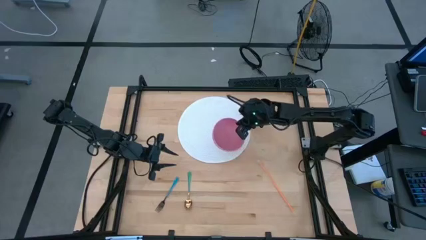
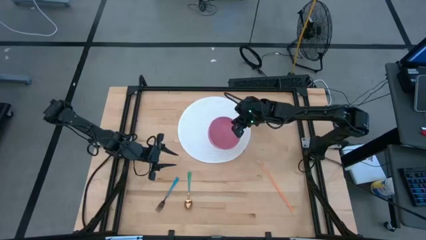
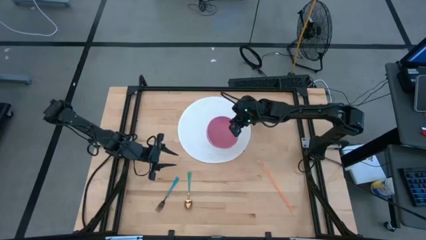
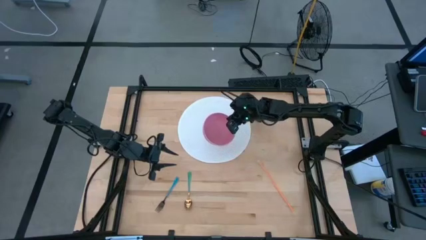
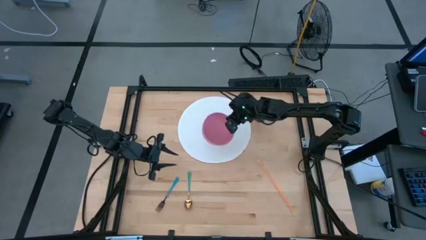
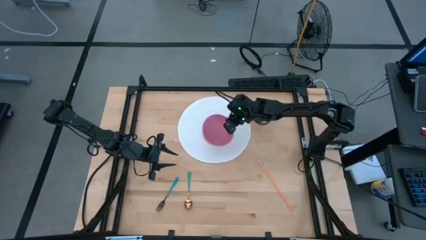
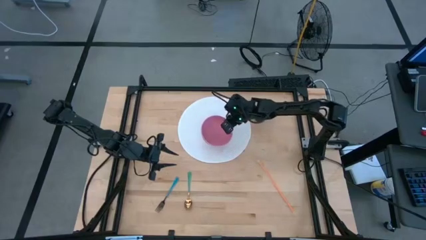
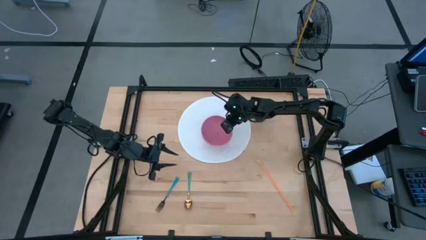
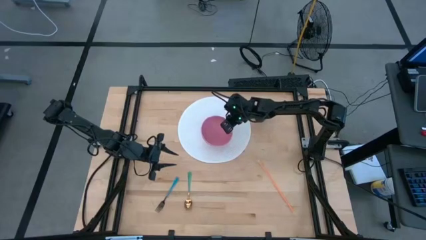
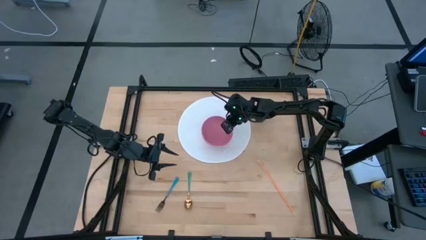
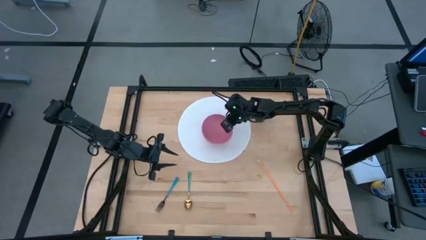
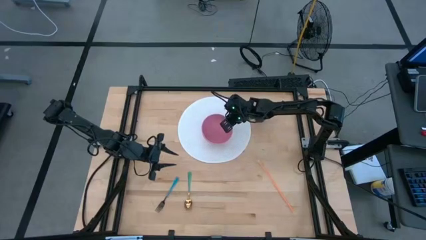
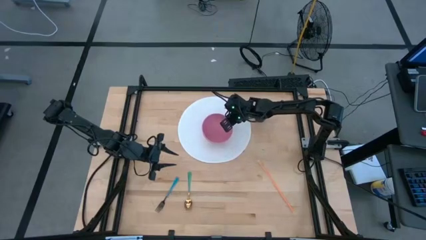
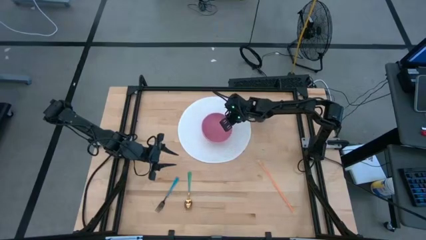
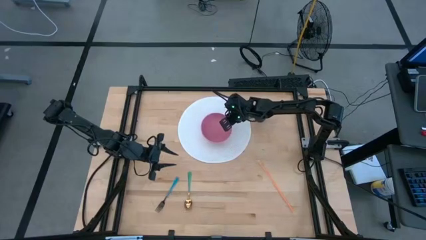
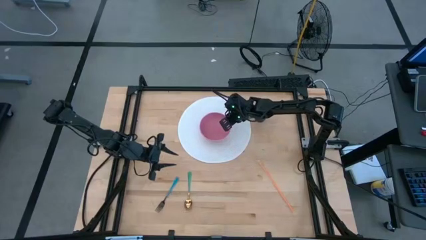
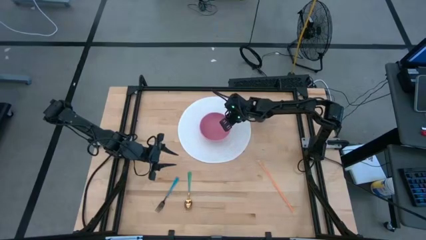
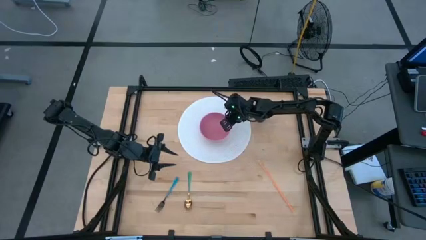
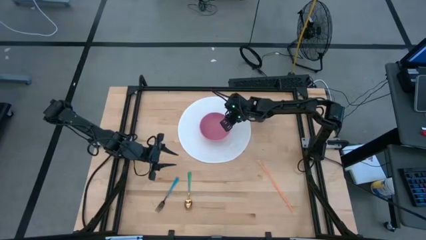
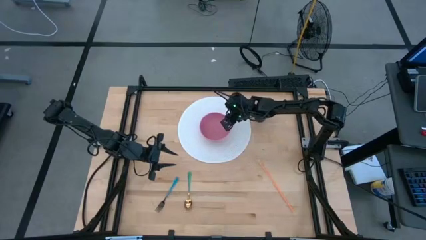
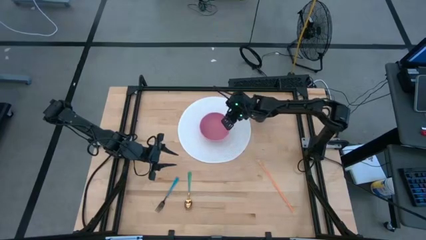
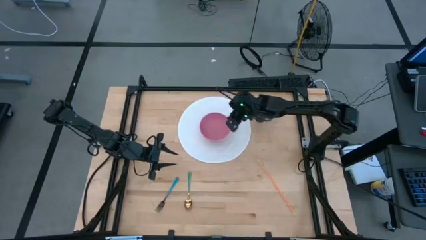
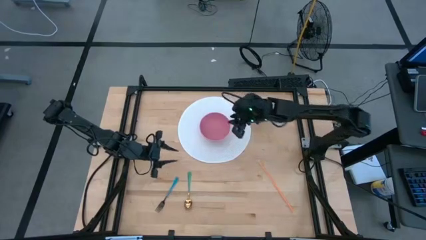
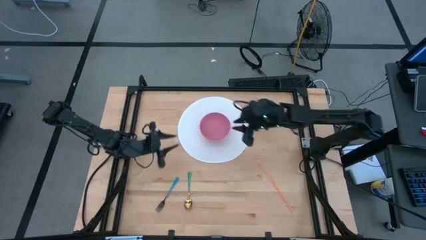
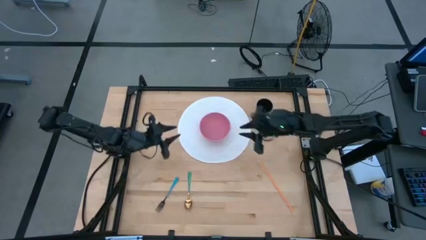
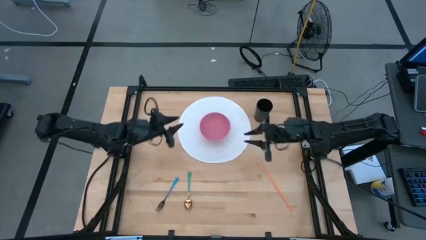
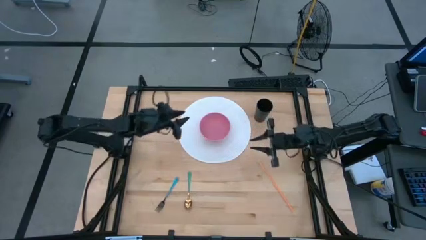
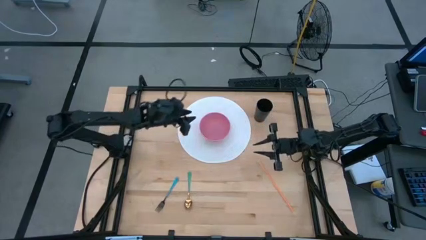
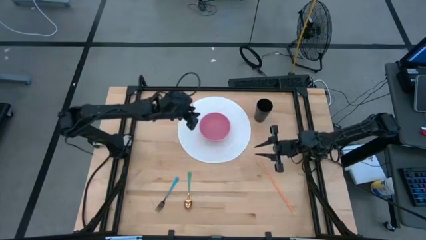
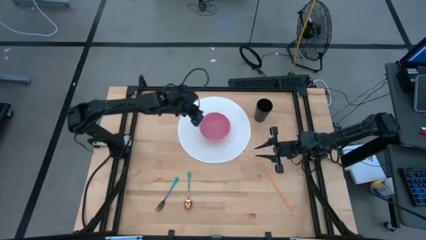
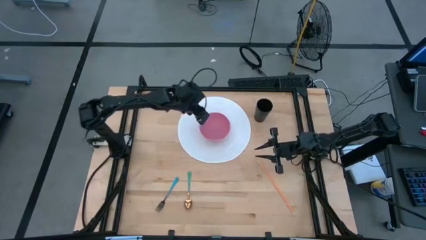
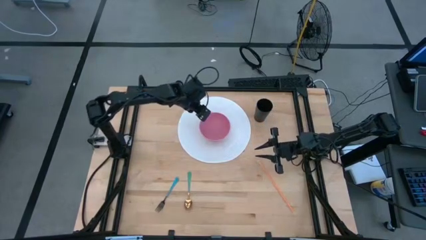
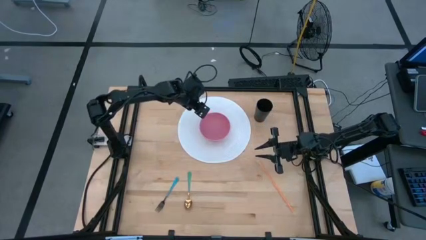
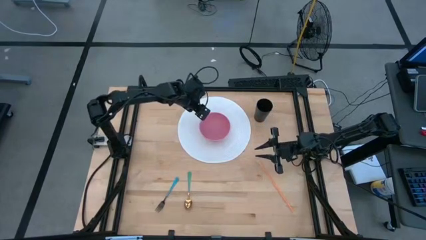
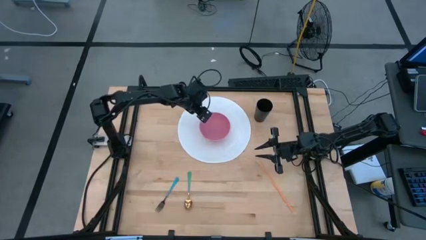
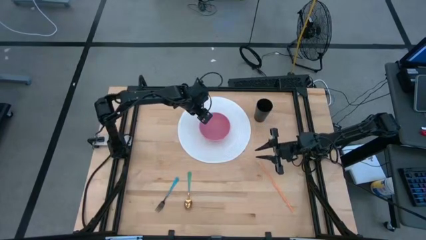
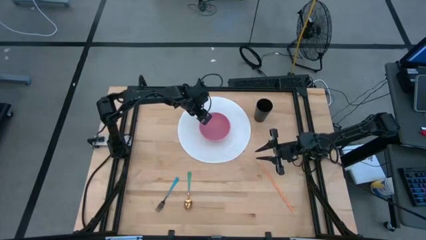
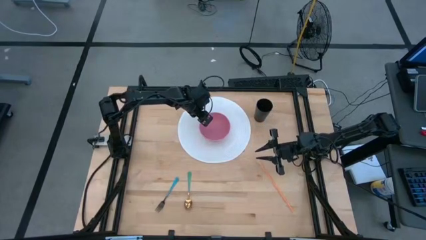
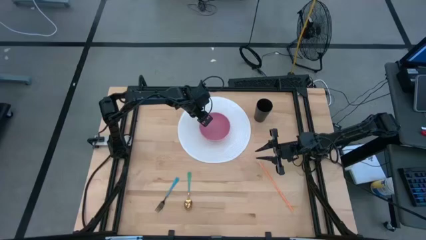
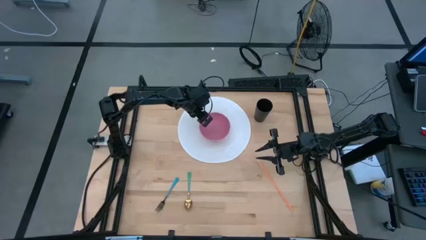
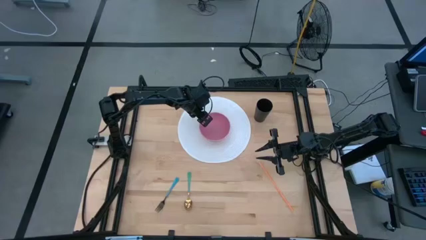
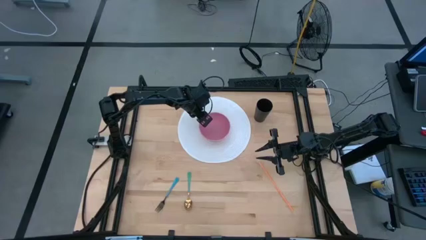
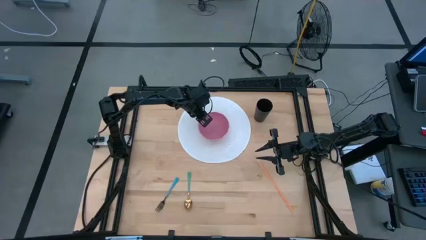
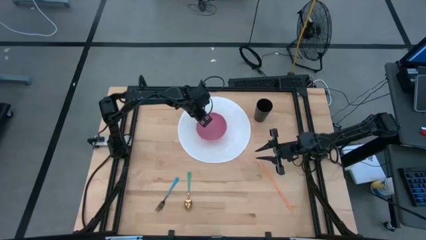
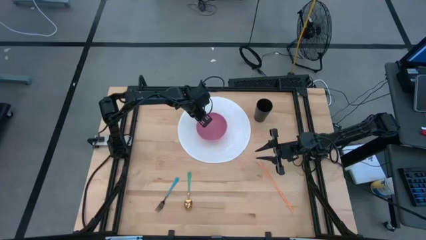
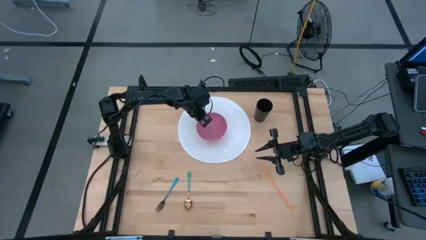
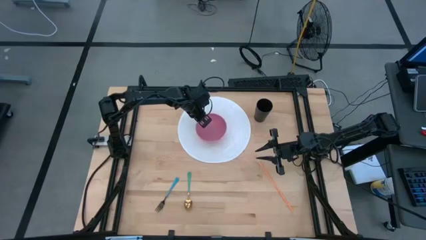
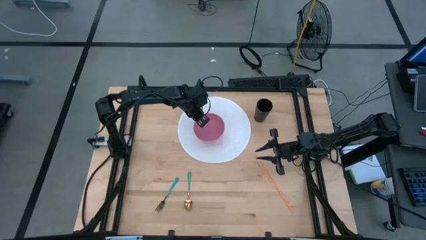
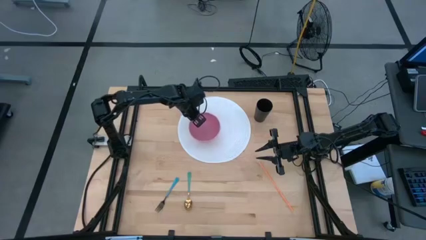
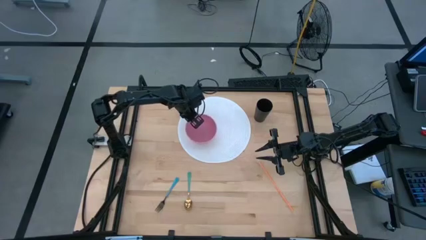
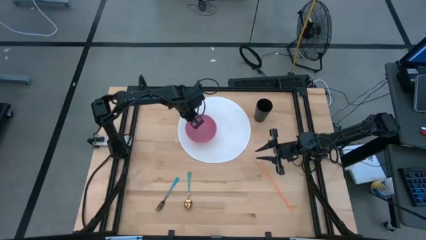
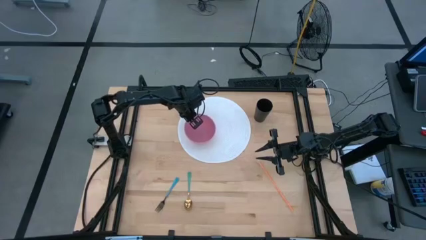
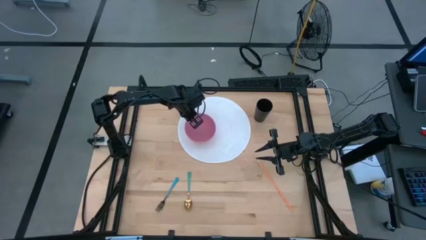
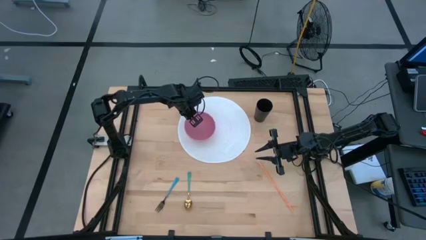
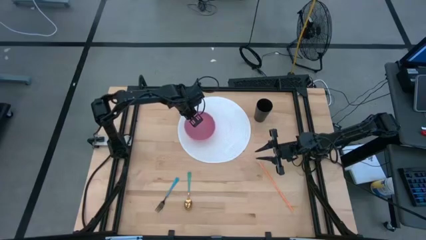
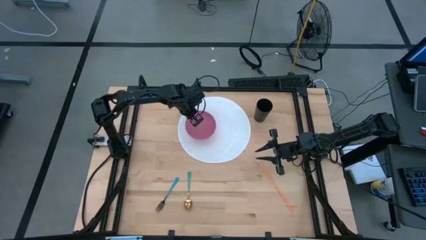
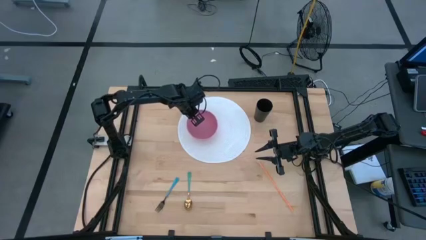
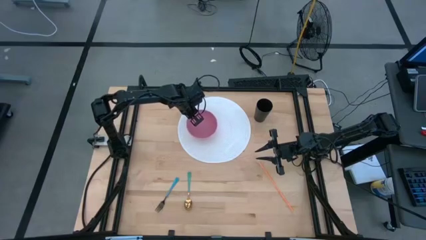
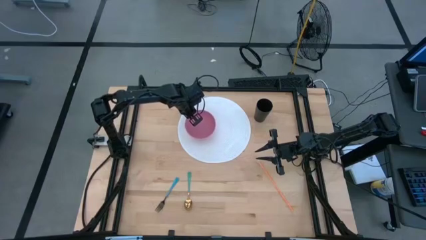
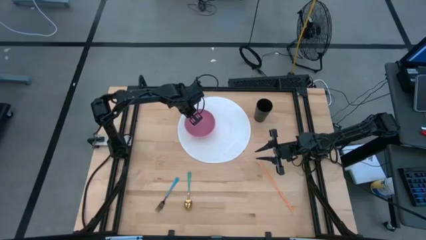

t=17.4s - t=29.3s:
Task: Pick & Place Utensil
Put the pink bowl on the white mat

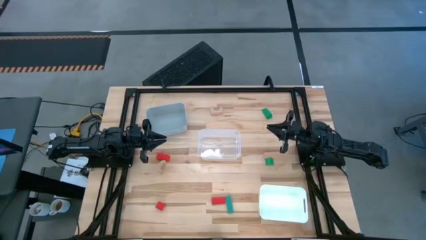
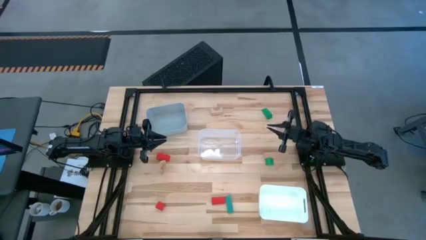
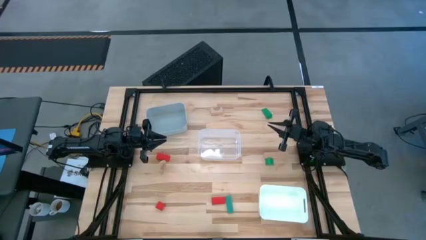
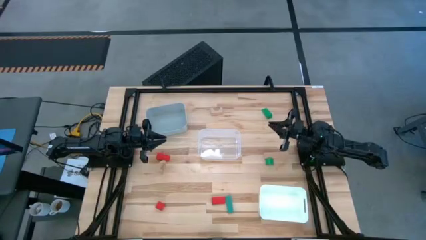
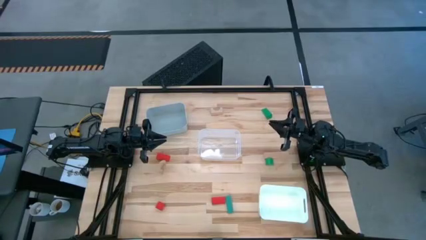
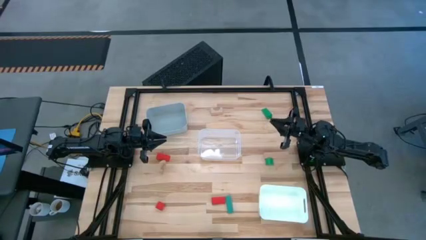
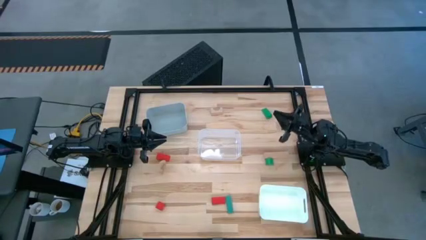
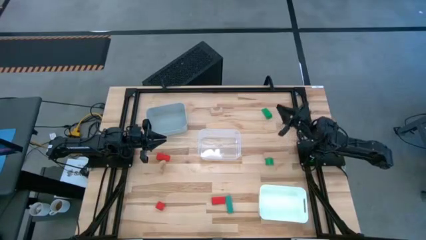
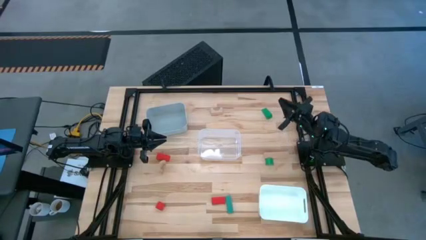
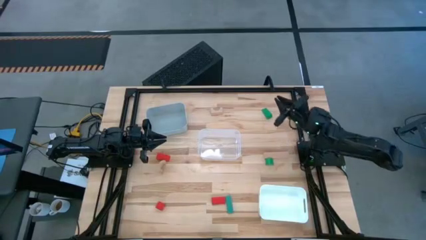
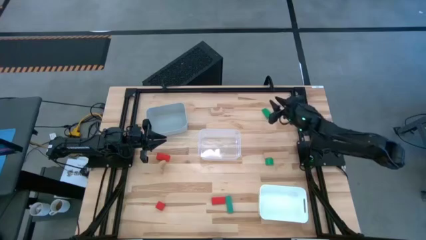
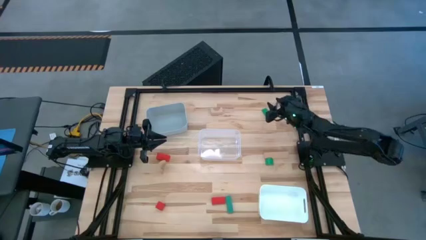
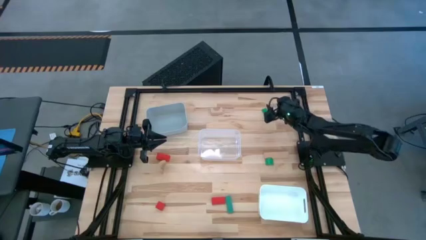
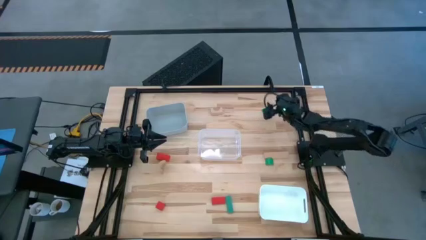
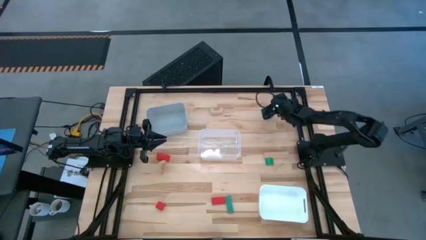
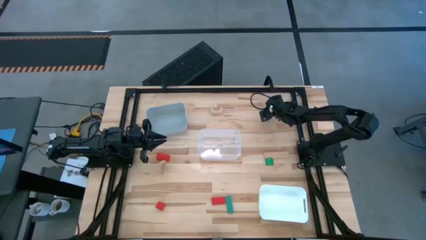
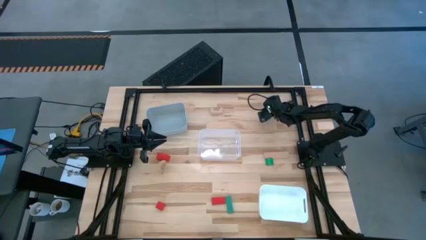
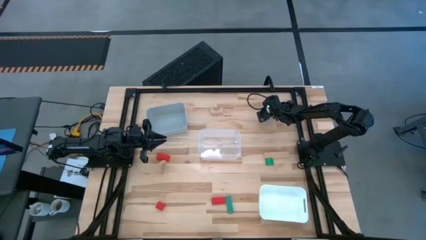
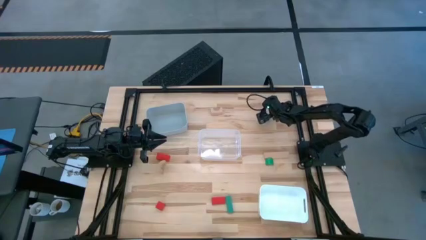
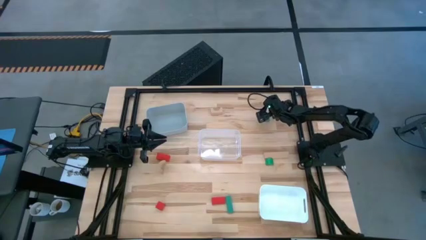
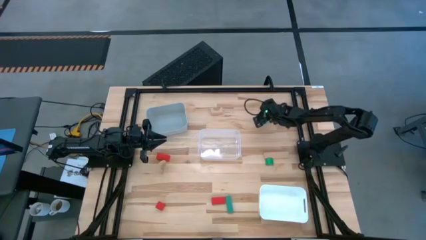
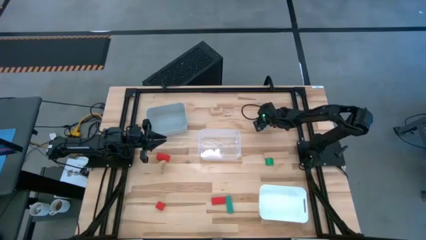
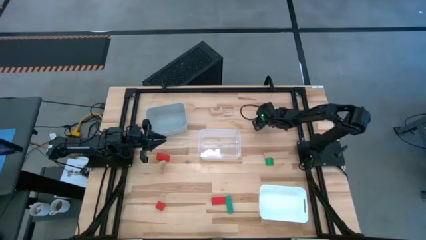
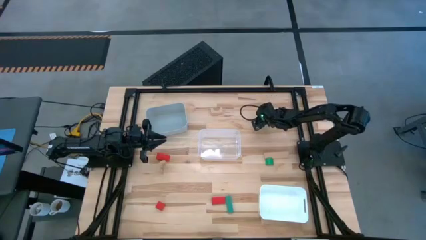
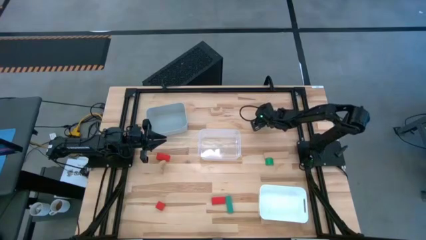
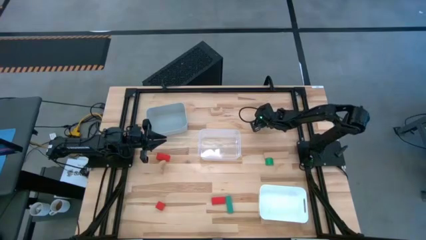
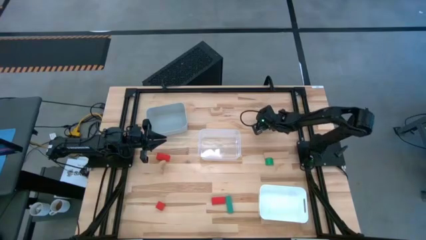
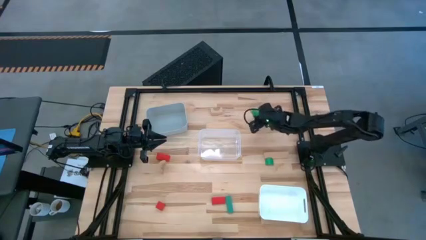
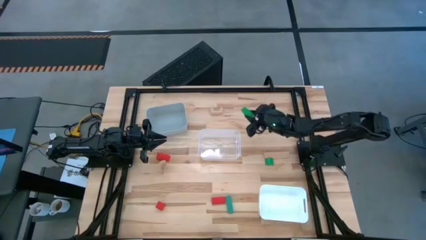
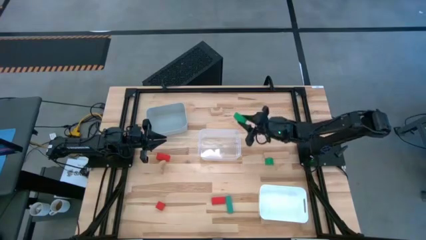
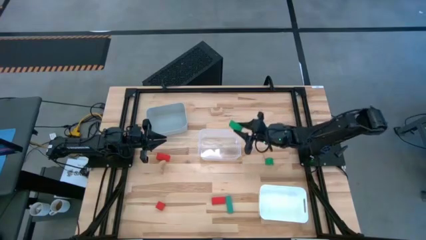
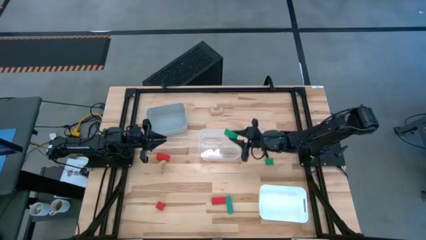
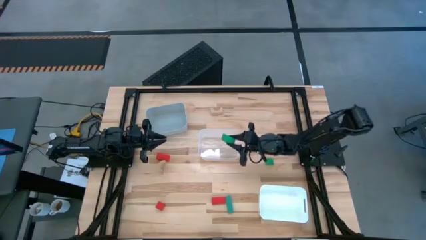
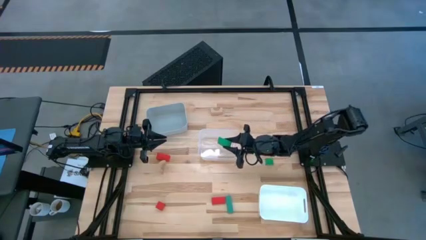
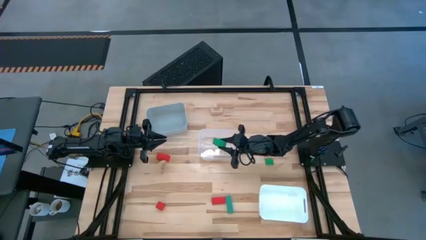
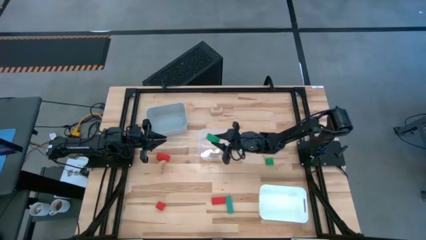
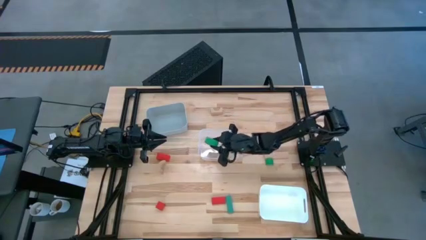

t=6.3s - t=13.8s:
Task: Sort & place blocks by color
Put the top right green block into the transparent bin
